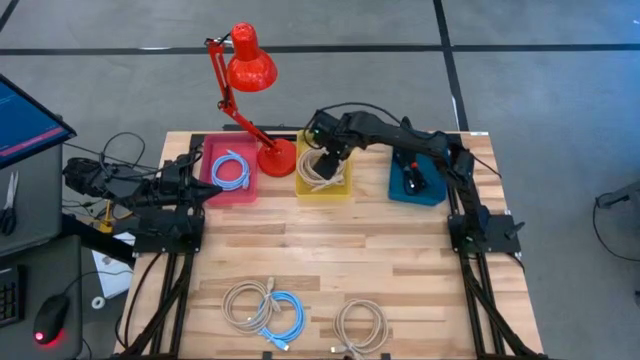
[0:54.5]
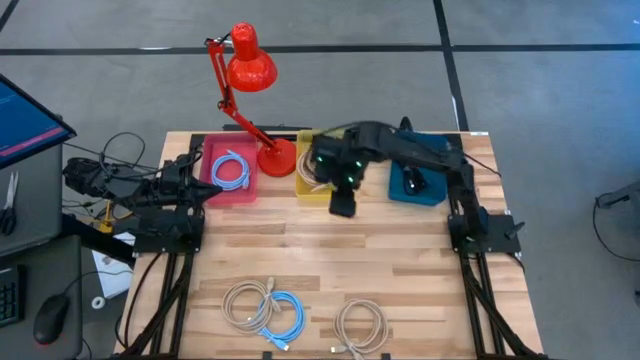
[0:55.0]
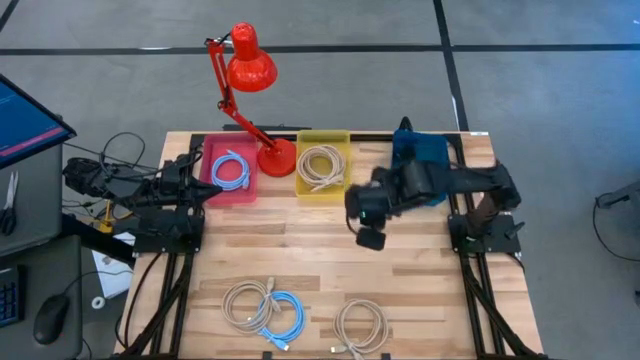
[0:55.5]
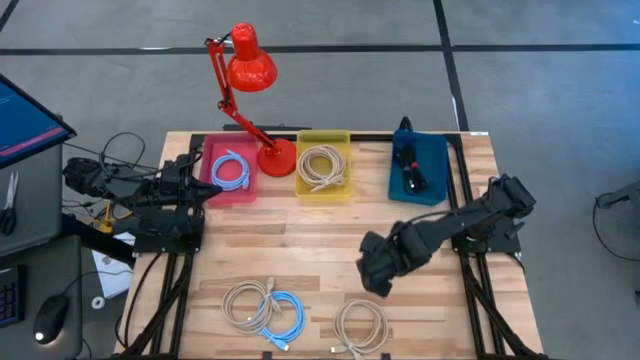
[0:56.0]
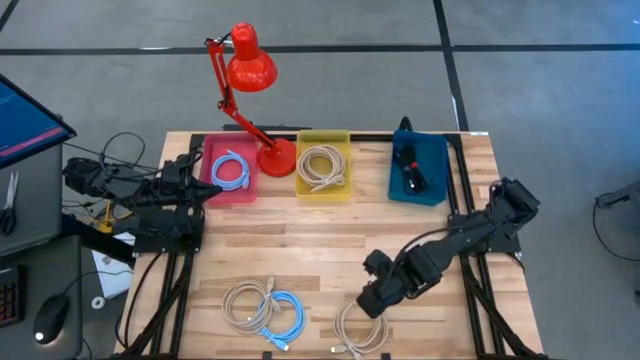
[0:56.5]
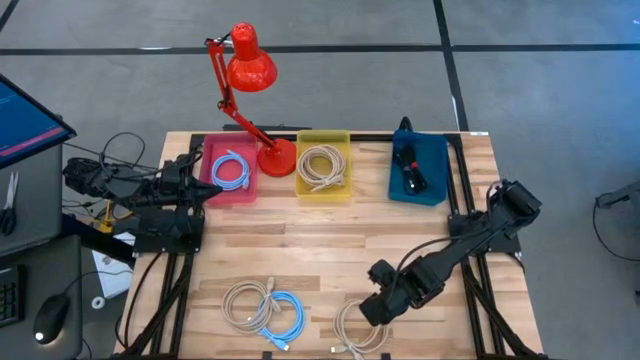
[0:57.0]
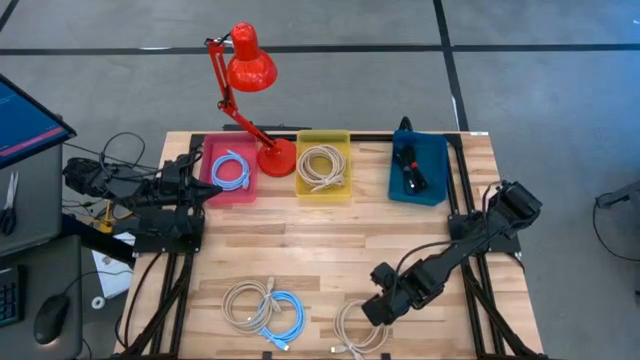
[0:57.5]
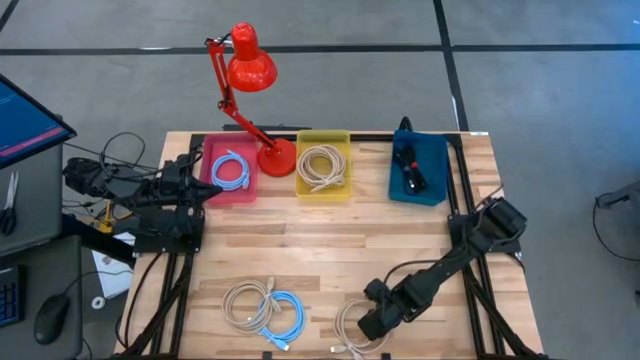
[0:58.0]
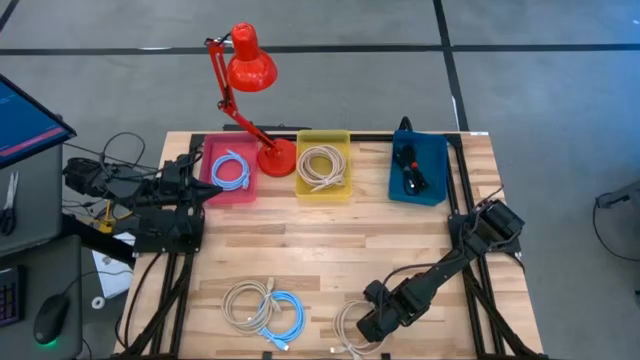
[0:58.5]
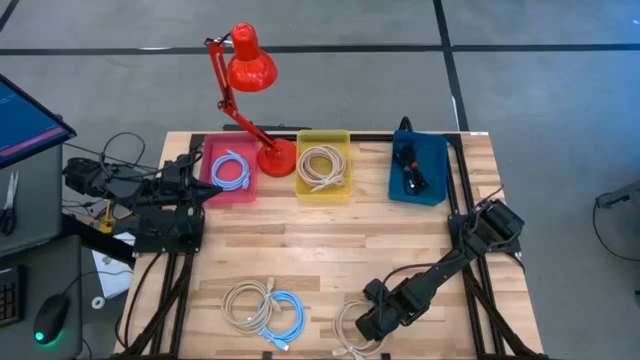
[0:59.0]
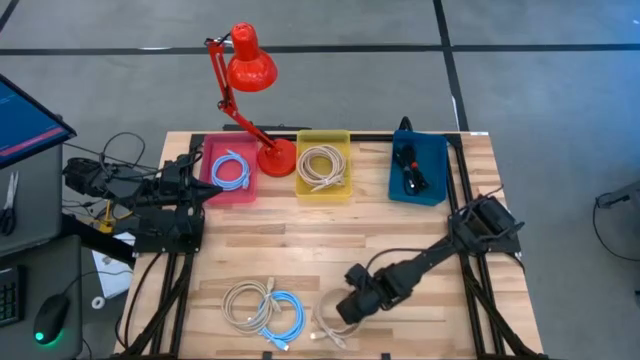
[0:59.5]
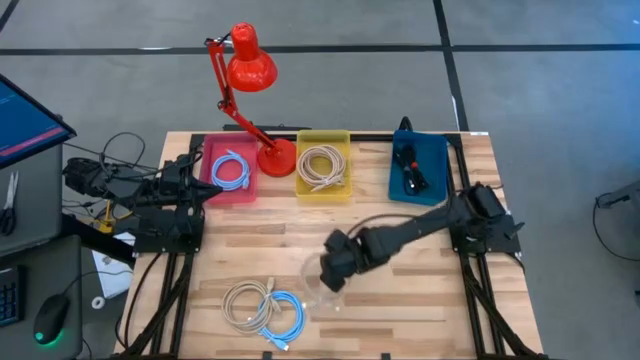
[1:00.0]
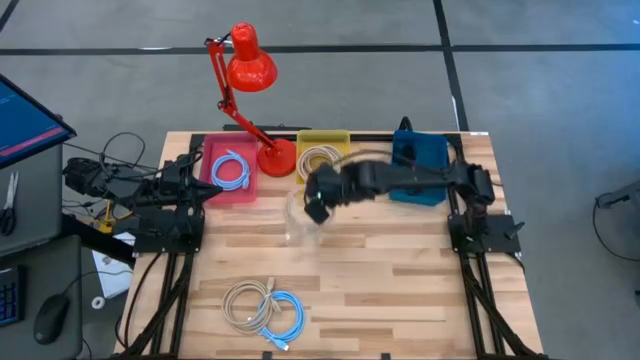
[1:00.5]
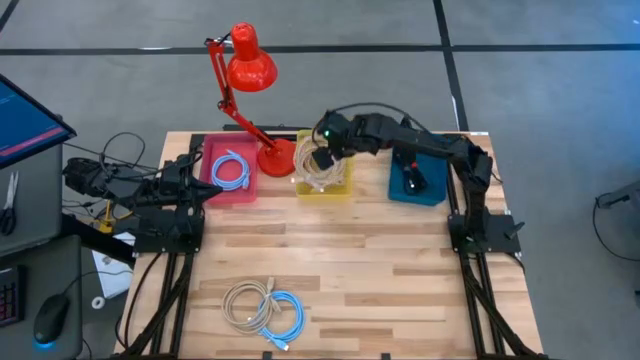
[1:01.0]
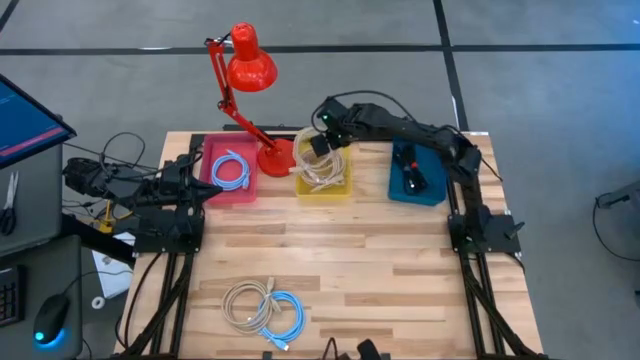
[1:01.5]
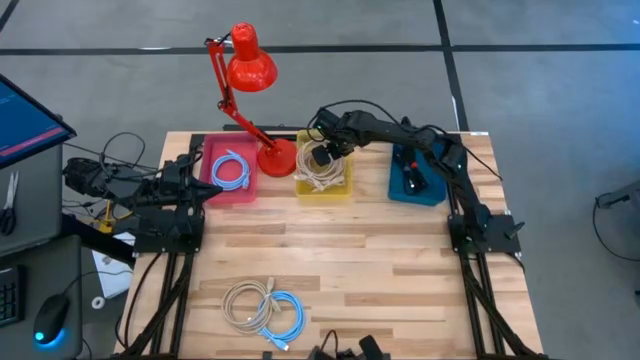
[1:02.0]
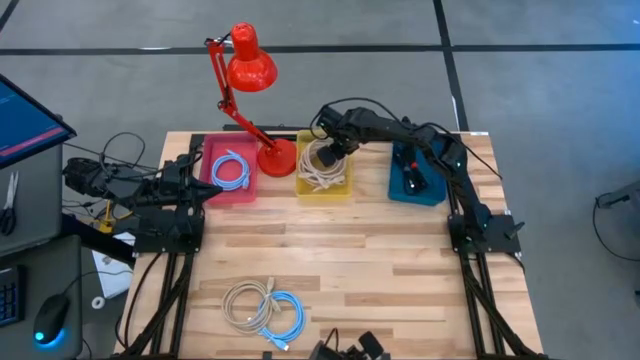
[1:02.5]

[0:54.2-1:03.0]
Task: Sort HDMI cables
Put the light brown HDMI cable into the yellow bin

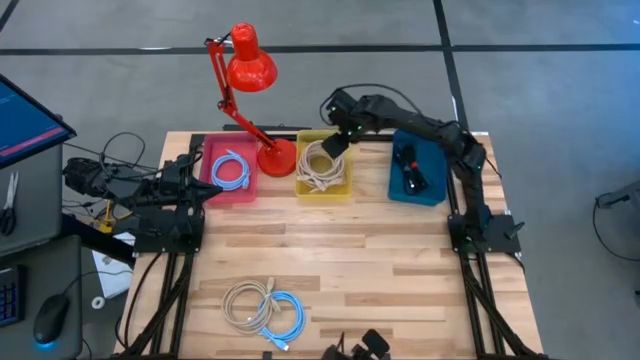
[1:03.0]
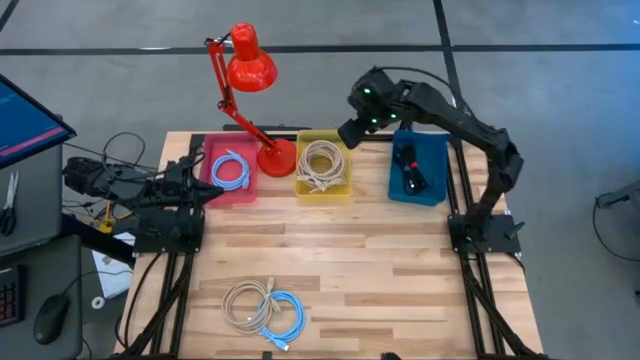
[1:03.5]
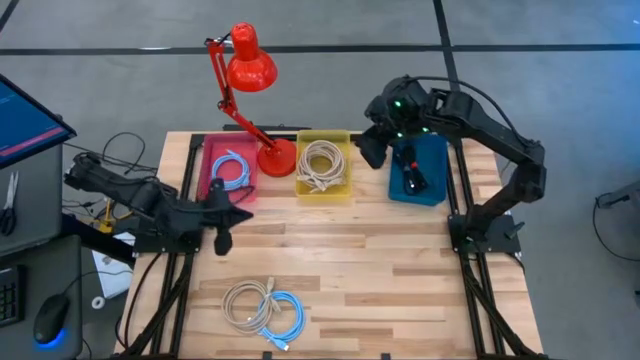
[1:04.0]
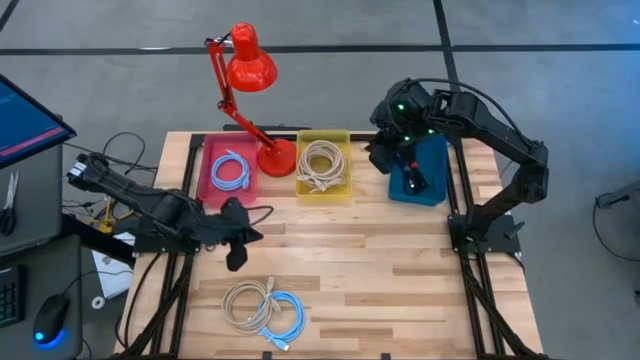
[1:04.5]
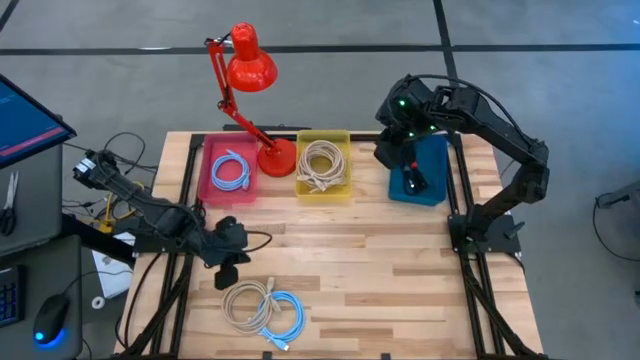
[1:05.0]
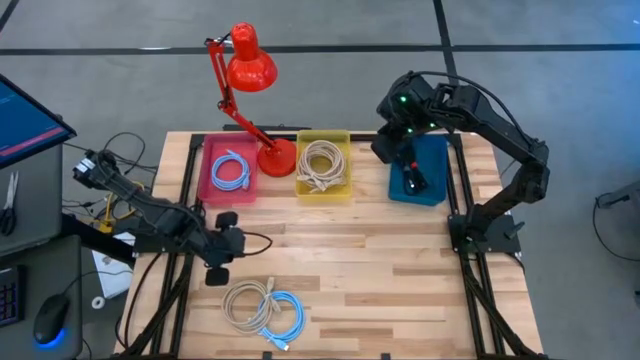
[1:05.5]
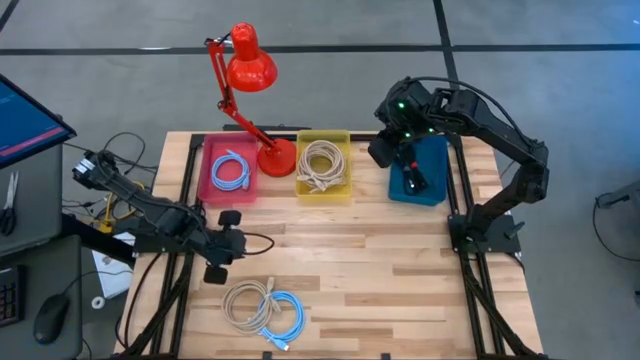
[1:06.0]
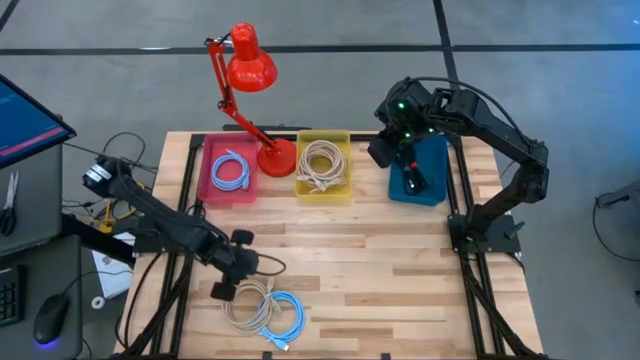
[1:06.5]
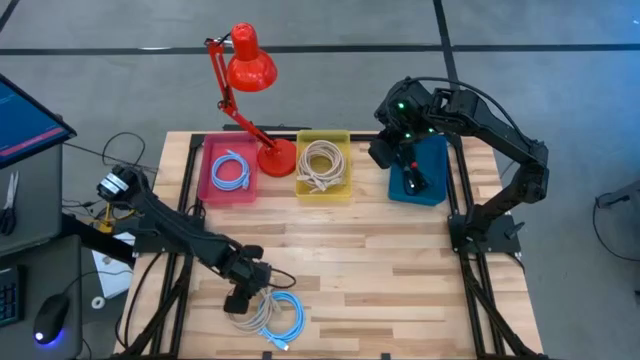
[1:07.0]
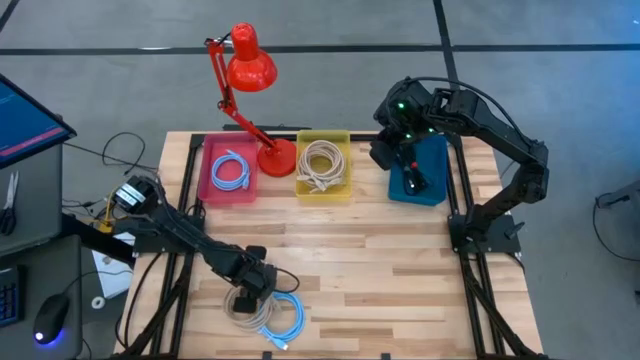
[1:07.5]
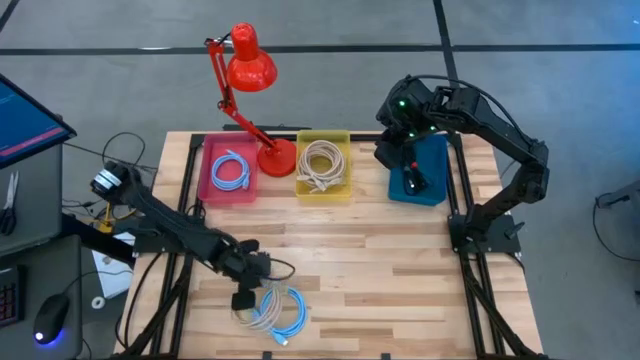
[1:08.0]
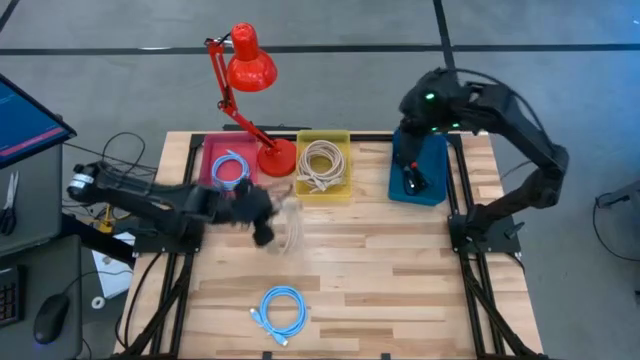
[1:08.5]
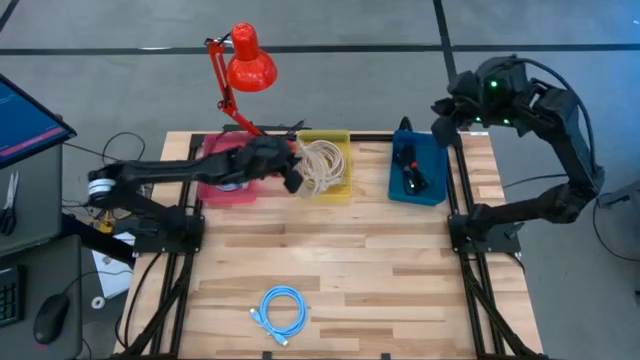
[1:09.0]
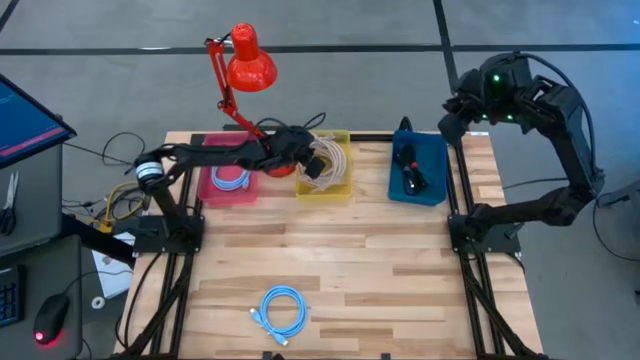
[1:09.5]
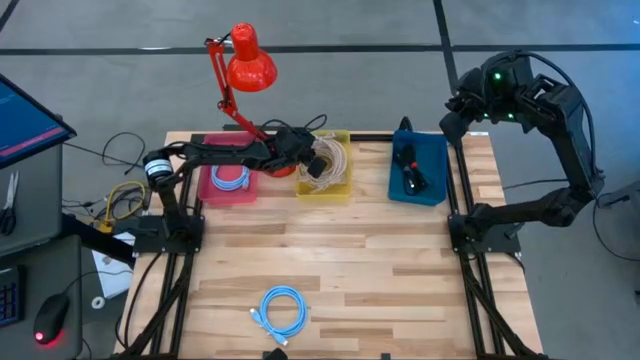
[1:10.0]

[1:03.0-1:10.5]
Put the light brown HDMI cable into the yellow bin

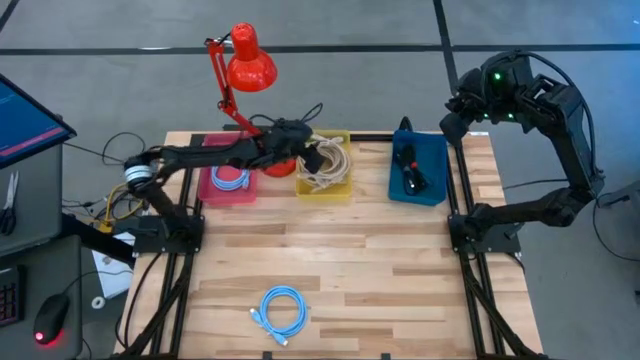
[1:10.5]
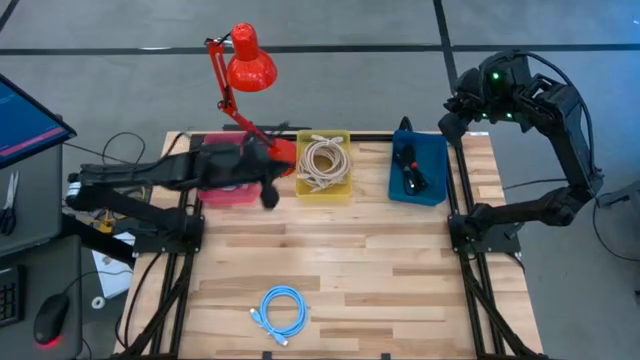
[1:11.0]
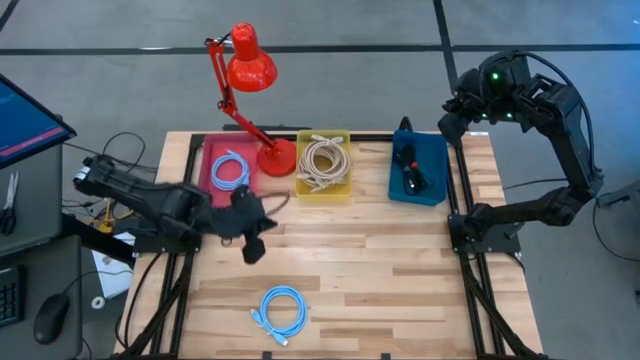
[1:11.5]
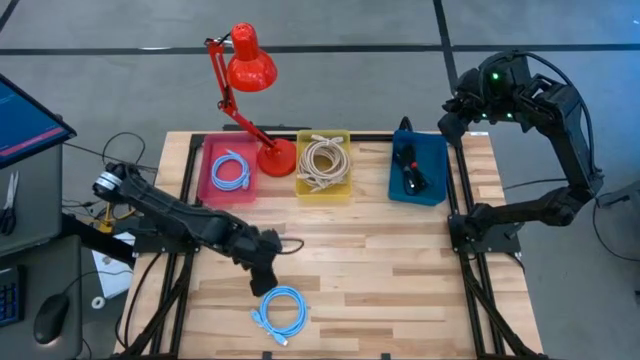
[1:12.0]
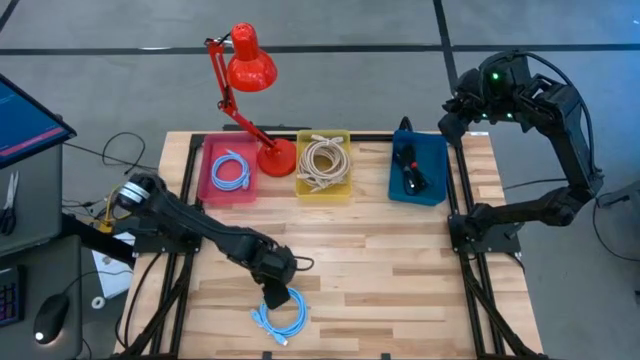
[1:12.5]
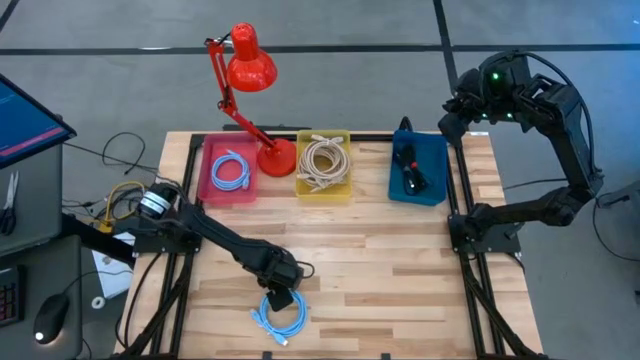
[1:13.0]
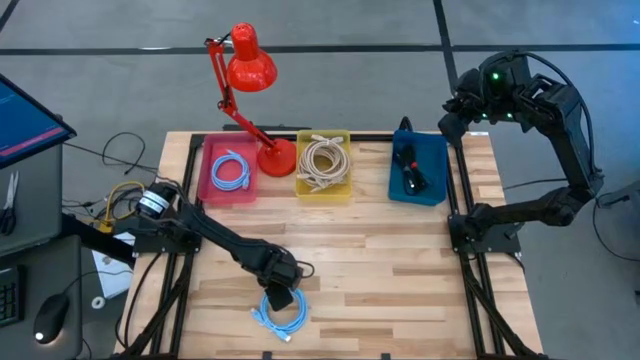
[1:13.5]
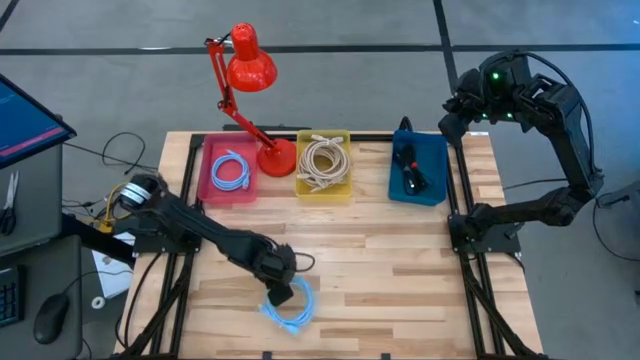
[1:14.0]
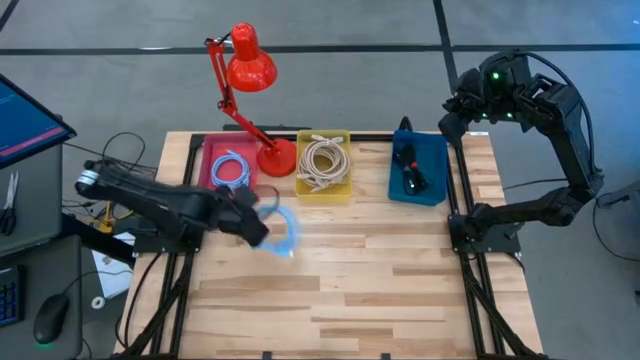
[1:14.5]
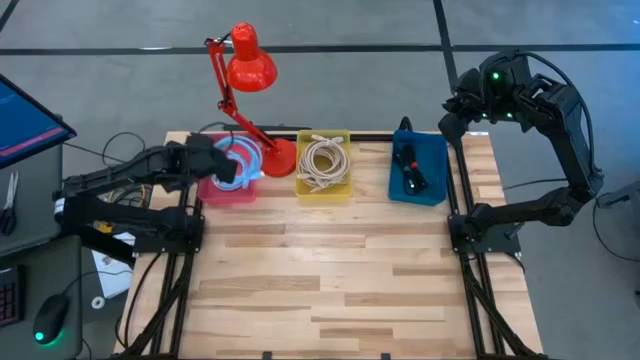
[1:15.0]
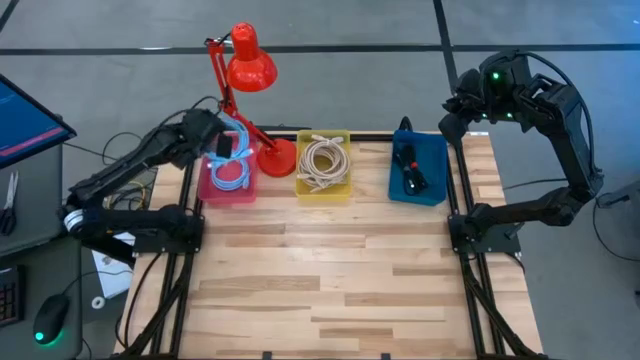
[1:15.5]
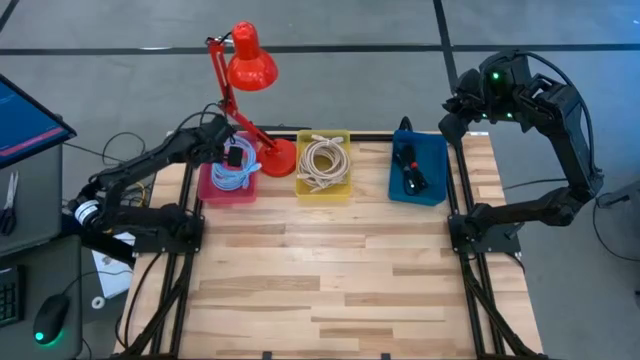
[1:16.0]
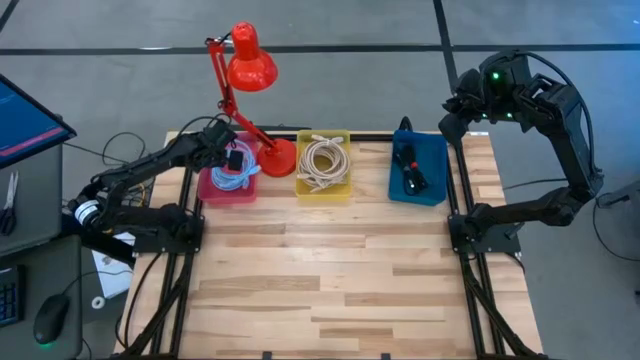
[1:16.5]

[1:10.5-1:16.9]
Put the light blue HDMI cable into the pink bin
